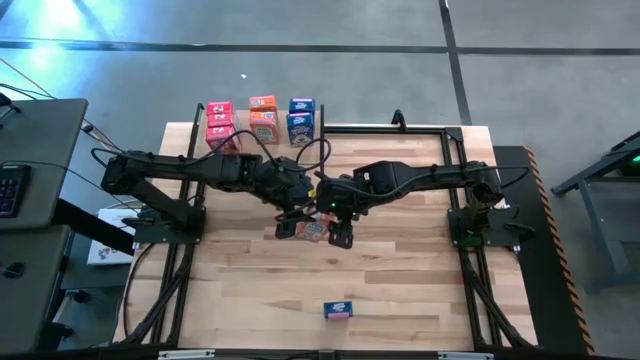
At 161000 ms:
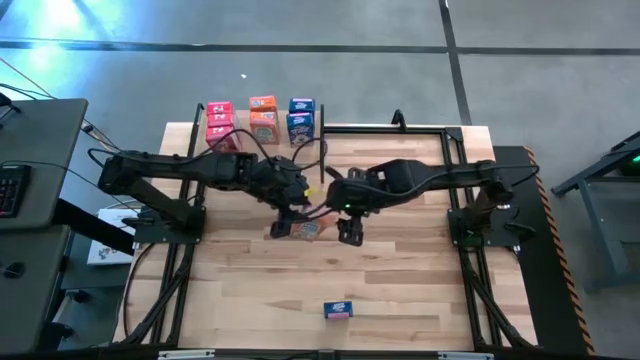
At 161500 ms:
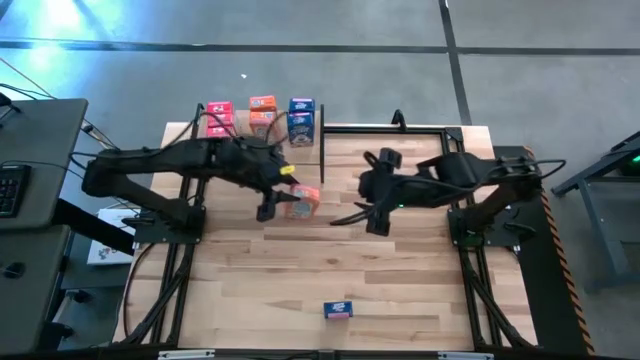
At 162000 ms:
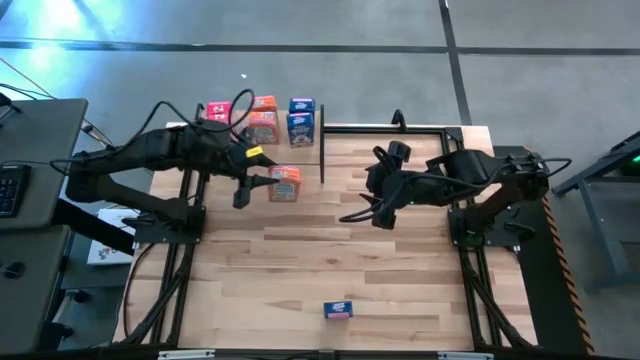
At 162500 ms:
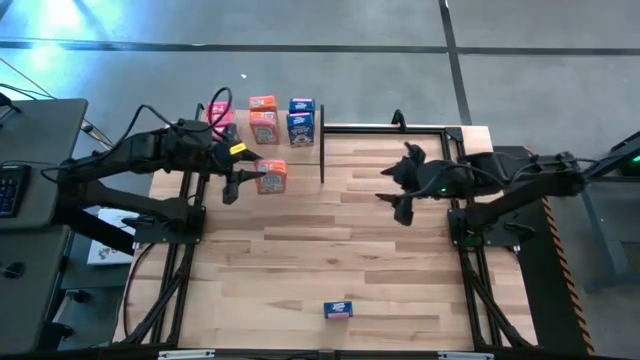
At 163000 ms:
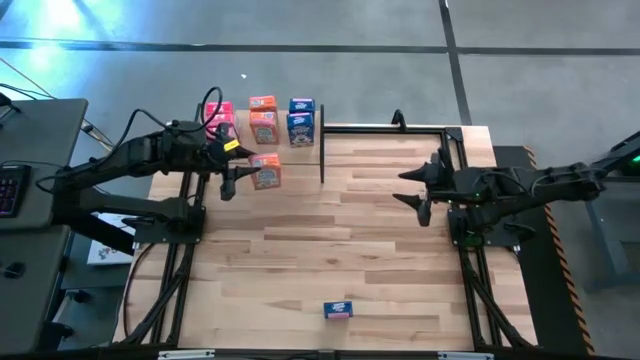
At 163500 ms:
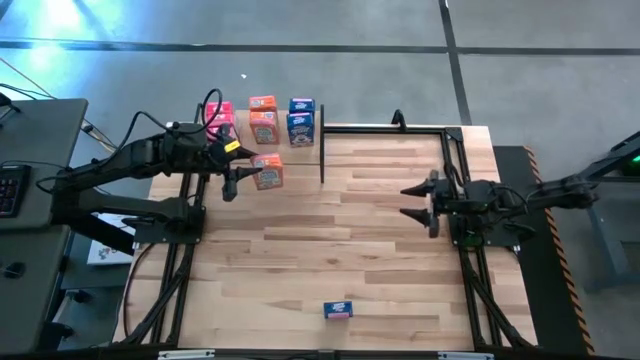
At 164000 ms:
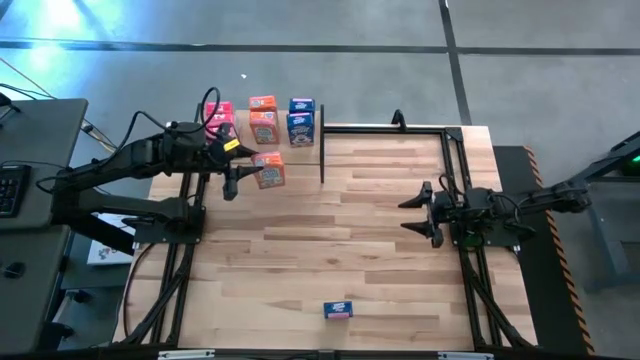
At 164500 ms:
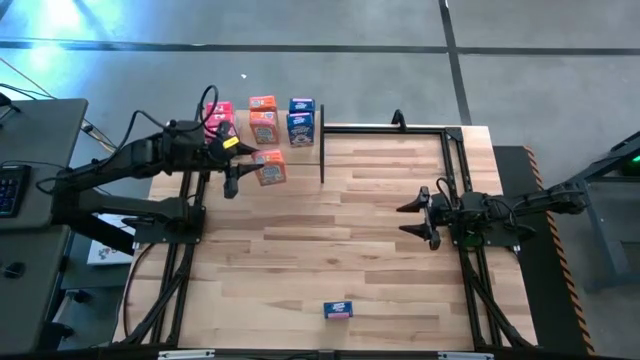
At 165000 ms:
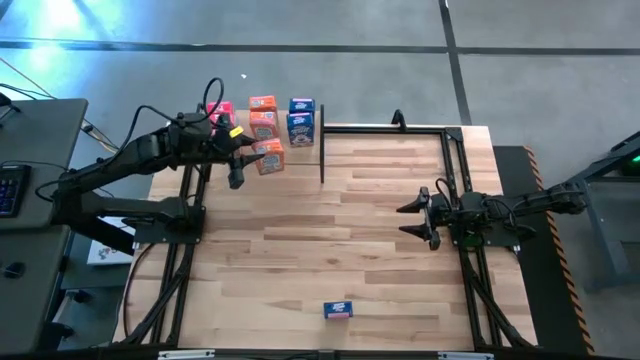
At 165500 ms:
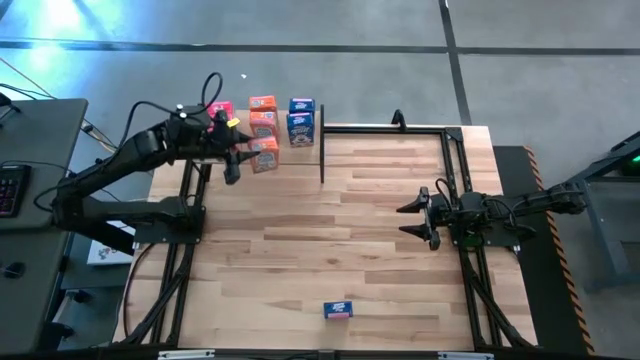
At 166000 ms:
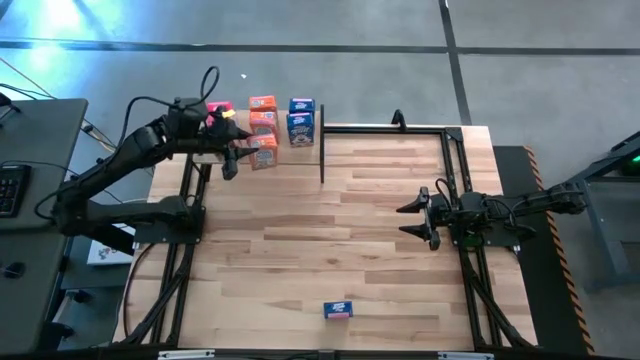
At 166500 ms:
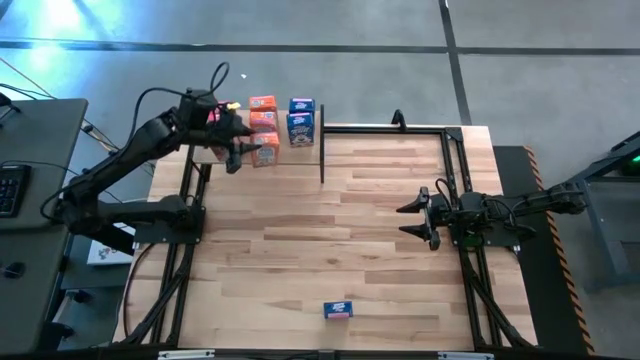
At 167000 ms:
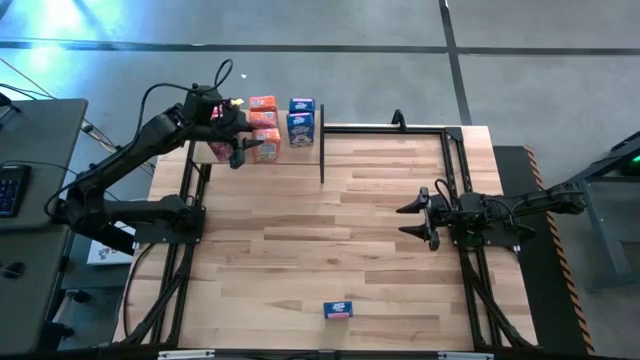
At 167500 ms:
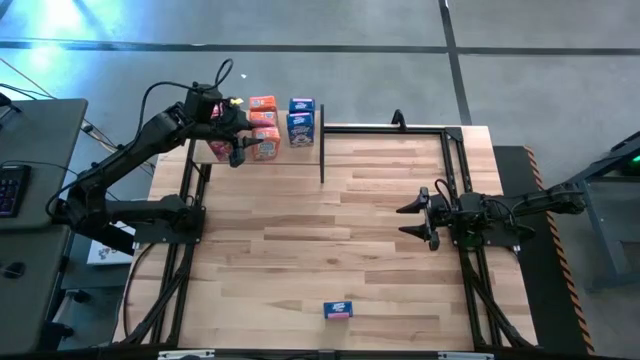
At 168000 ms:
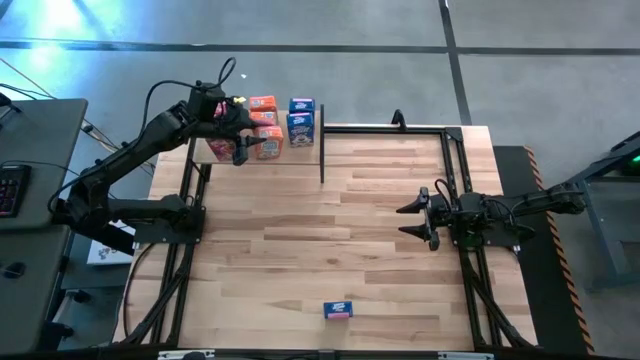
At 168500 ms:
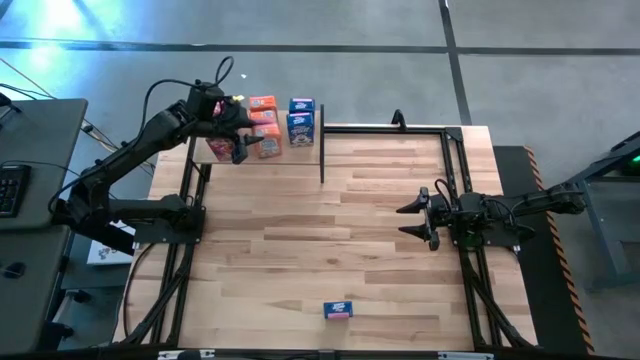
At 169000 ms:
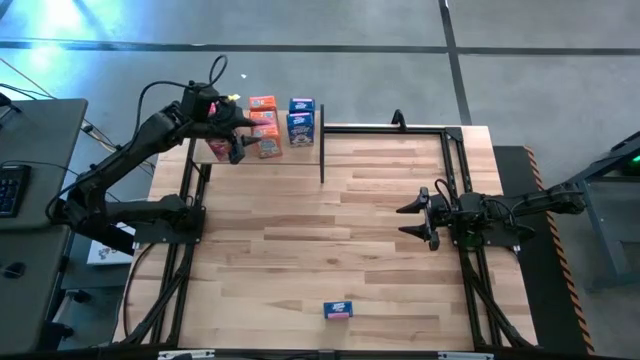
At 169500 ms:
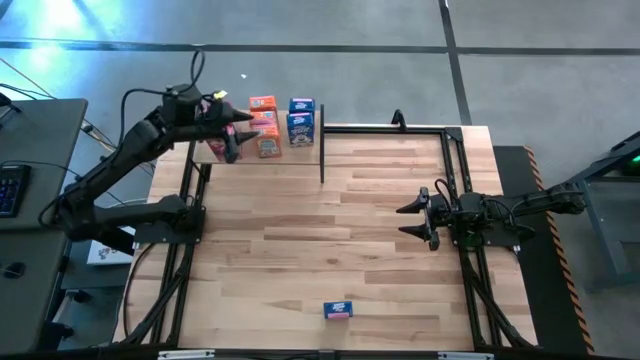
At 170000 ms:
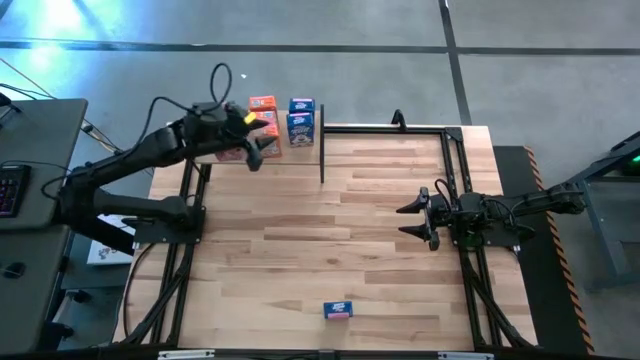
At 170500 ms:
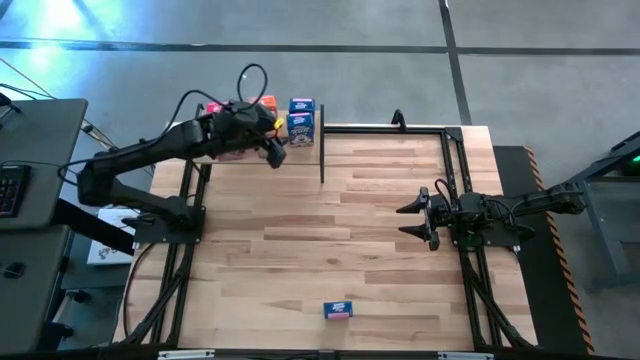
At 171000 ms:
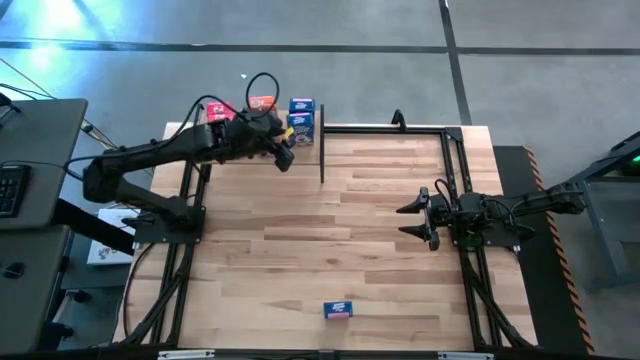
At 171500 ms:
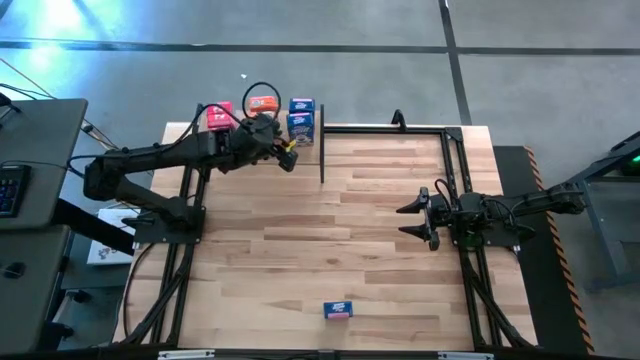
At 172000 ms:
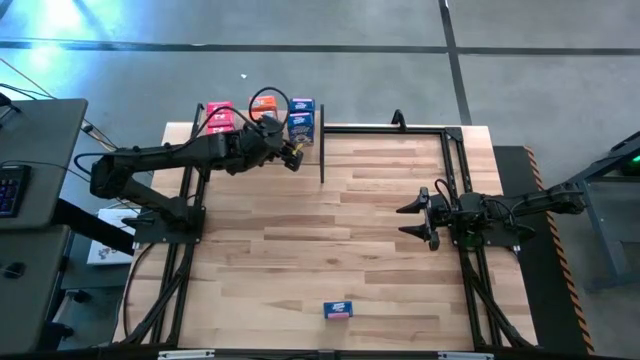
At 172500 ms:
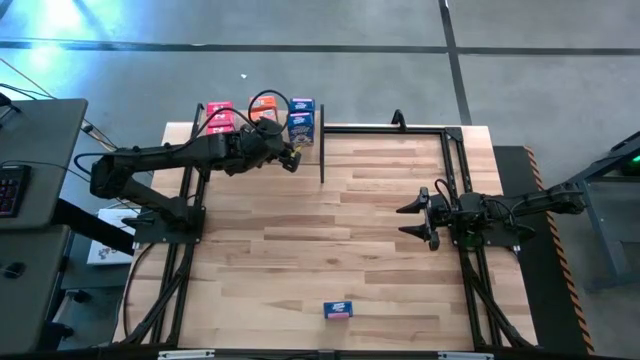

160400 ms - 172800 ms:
Task: Stack cereal on shelf
Put the orange cereal box on the the shelf aligned with the other orange cereal boxes

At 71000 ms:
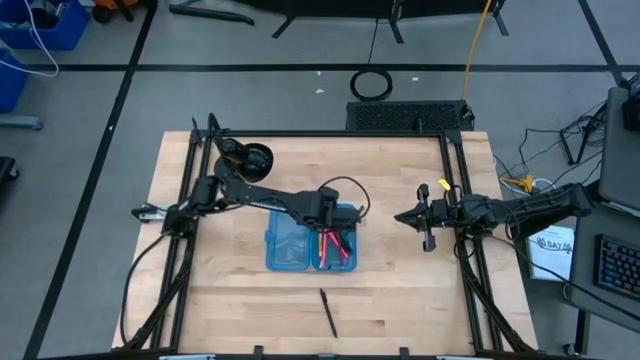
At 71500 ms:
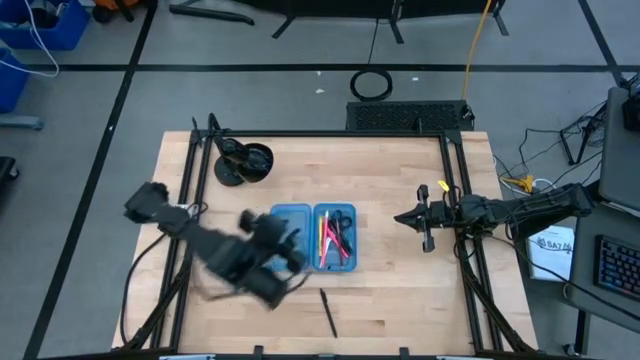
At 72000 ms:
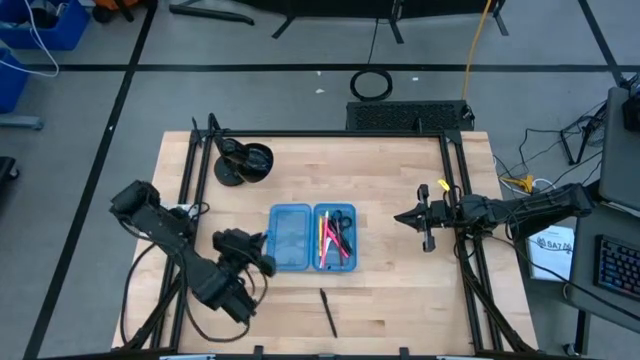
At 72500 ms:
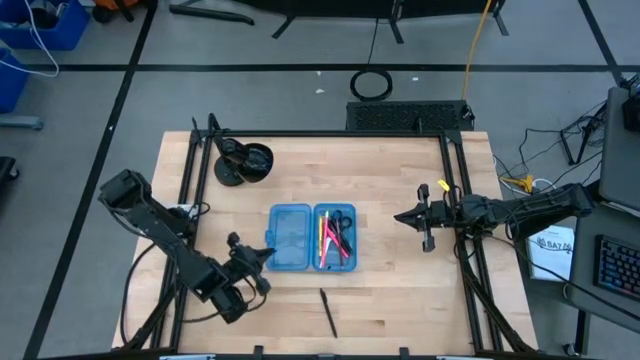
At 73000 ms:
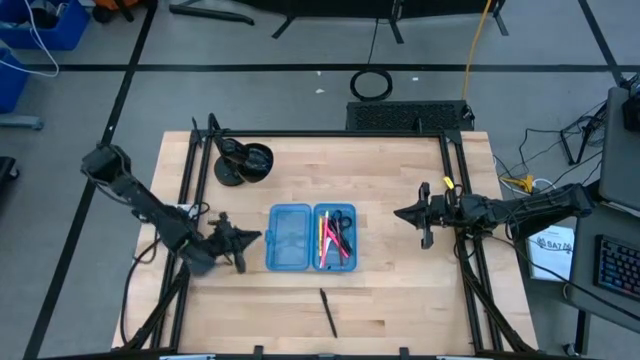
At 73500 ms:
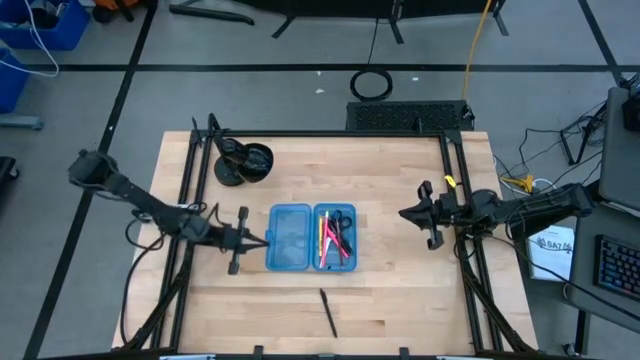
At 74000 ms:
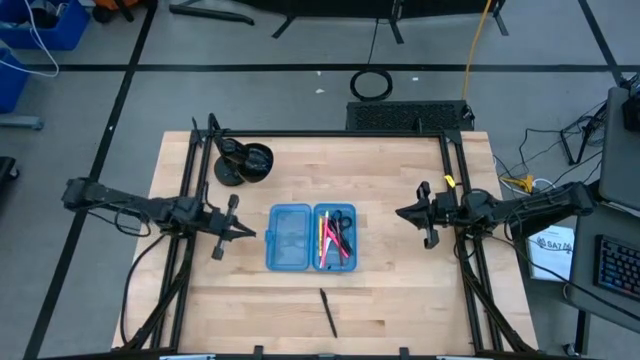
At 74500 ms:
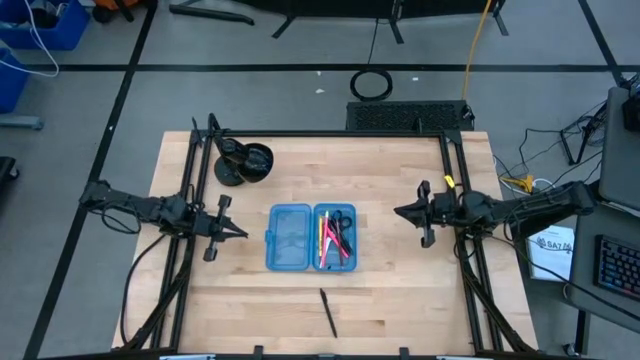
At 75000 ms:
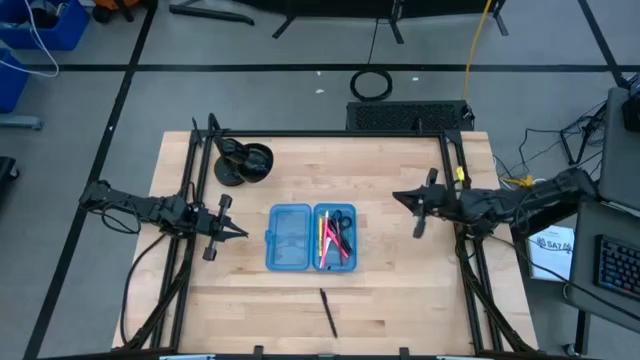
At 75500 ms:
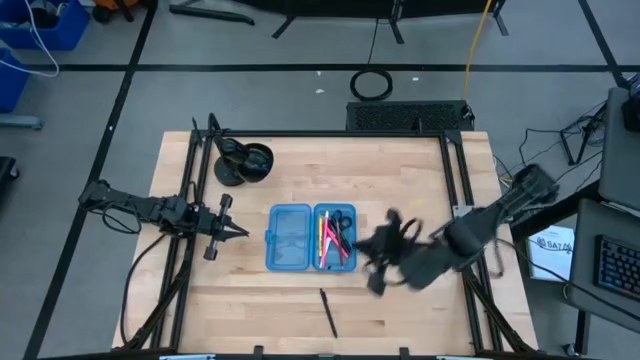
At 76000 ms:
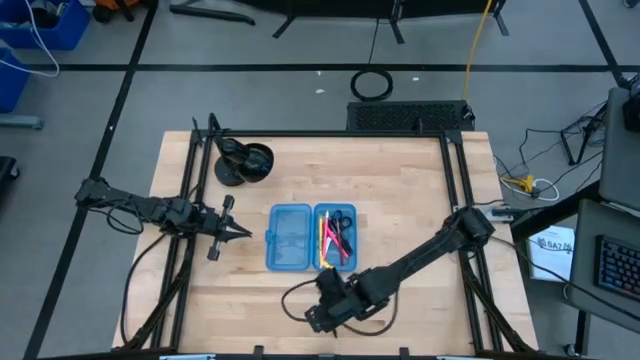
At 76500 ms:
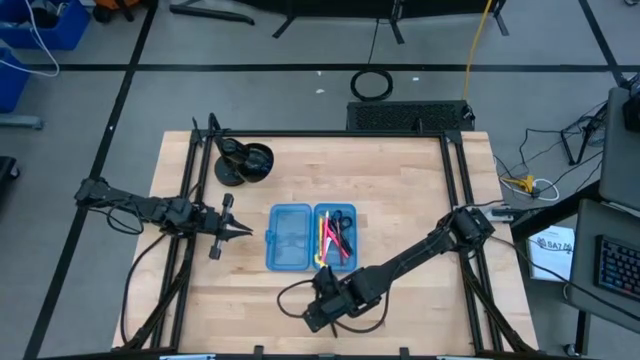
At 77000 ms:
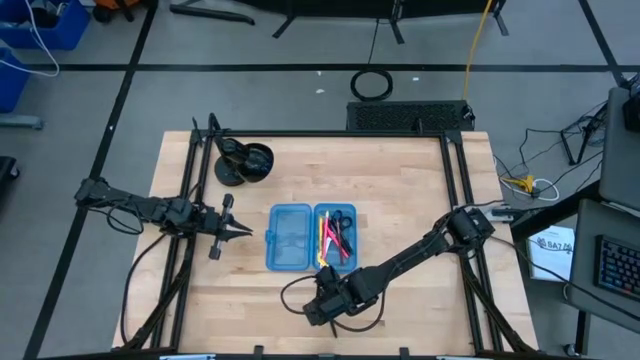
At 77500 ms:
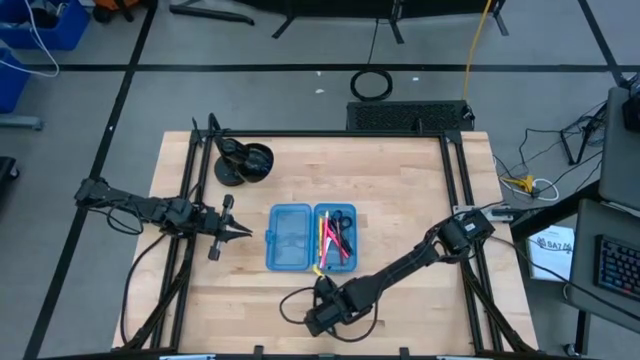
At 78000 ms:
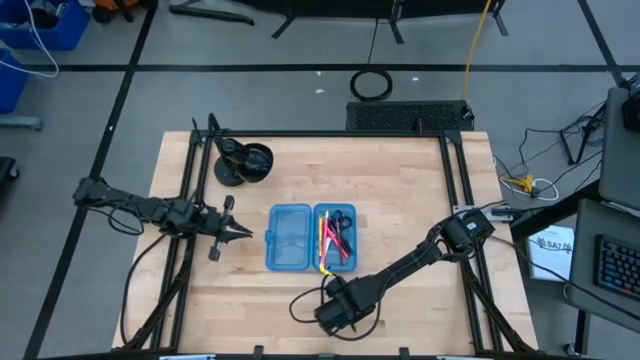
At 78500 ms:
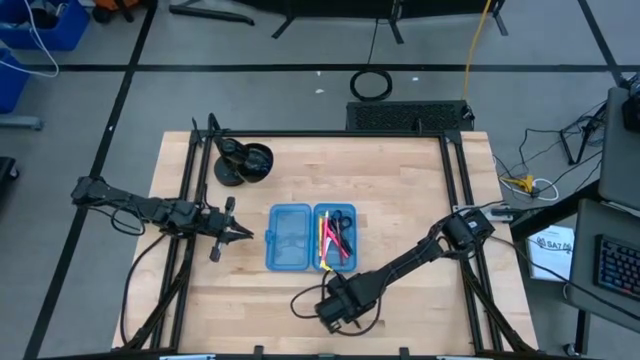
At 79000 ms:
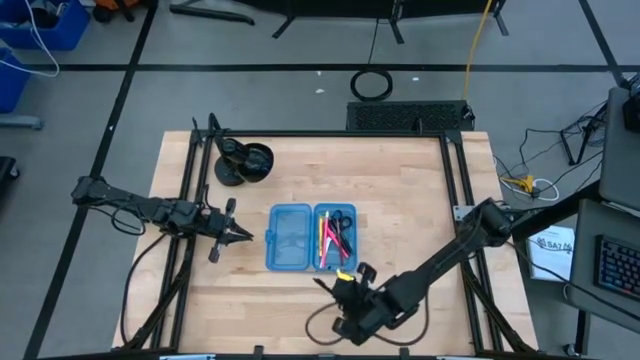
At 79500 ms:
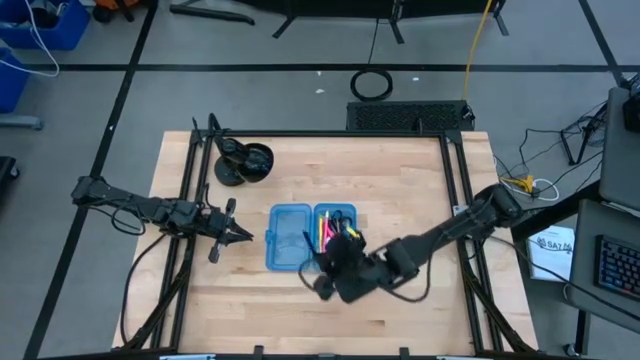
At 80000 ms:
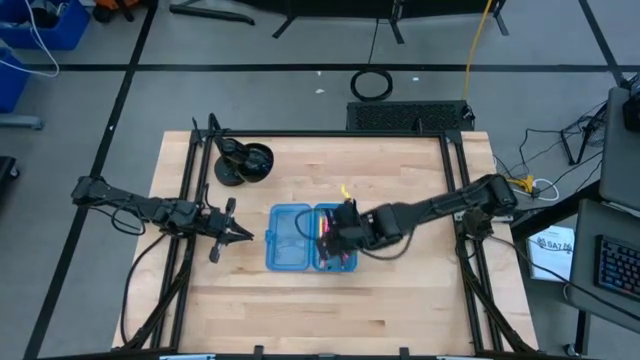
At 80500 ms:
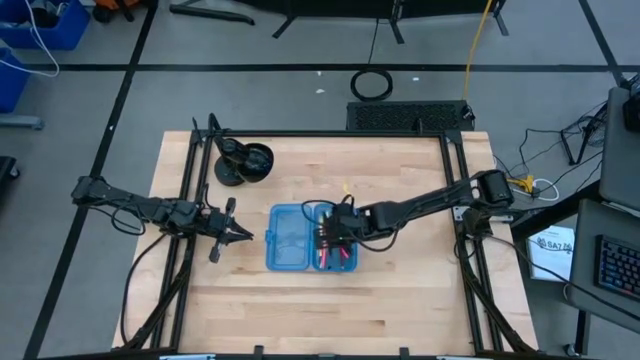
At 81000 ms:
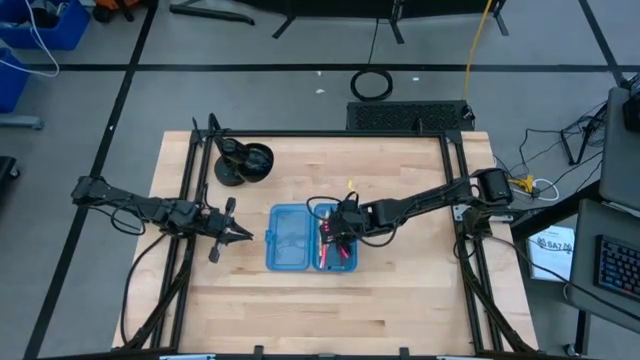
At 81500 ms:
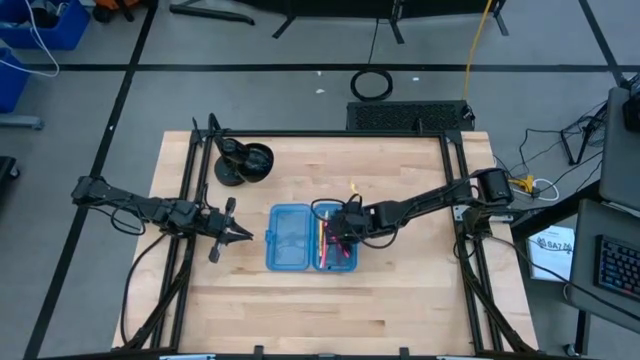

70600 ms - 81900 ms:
Task: Pick & place school supplies into a supply box
Put the black pen into the blue supply box
